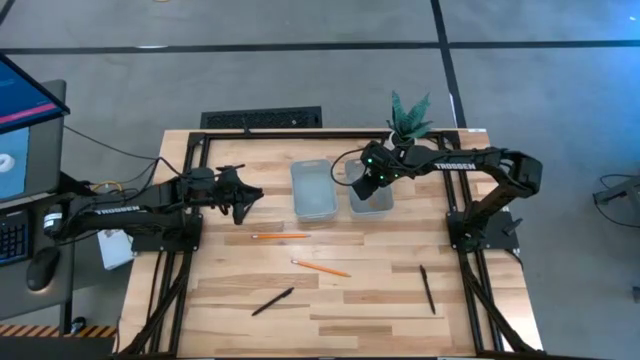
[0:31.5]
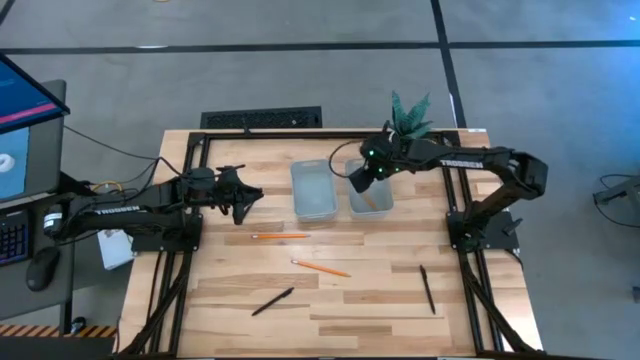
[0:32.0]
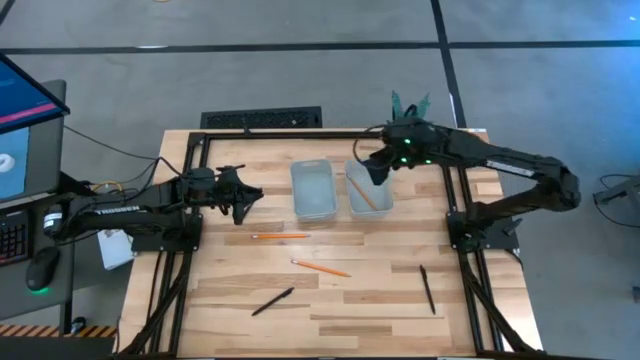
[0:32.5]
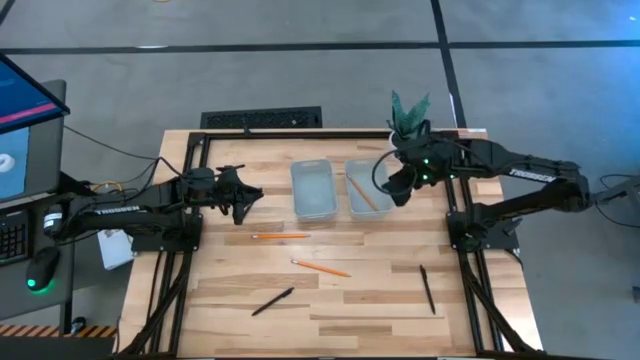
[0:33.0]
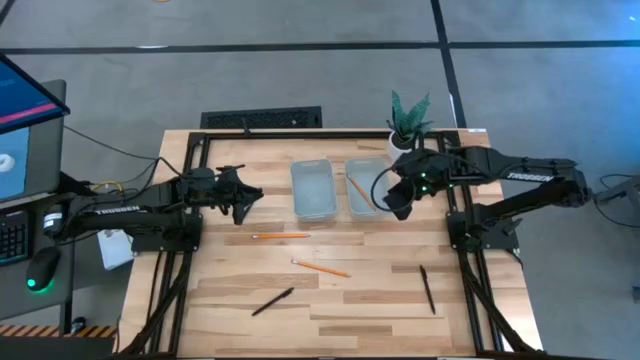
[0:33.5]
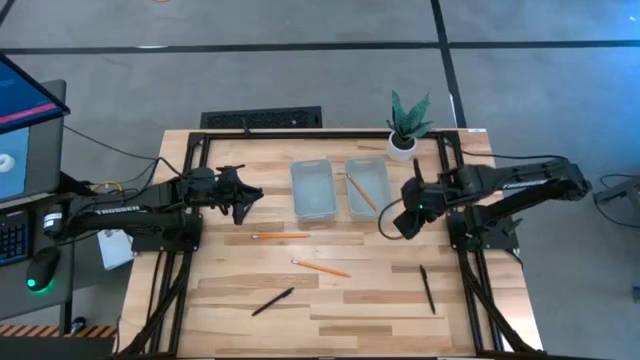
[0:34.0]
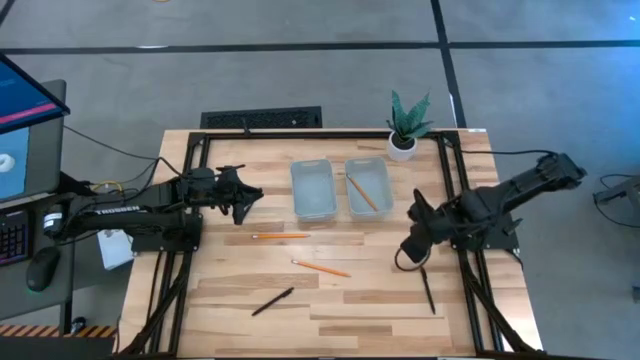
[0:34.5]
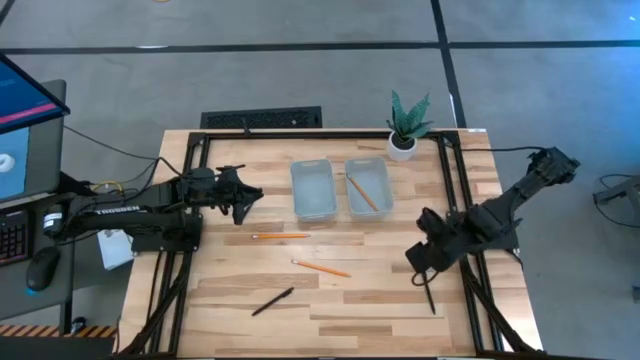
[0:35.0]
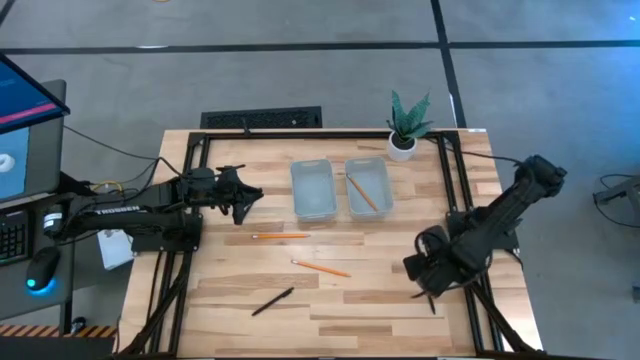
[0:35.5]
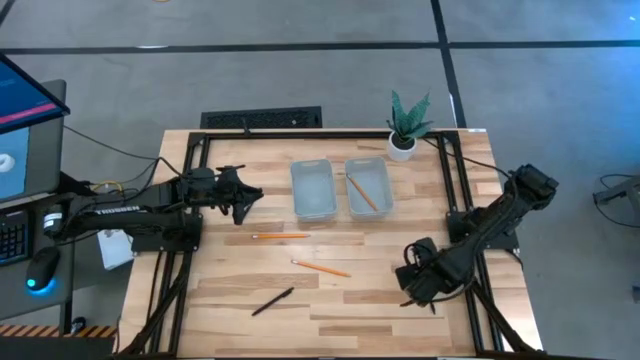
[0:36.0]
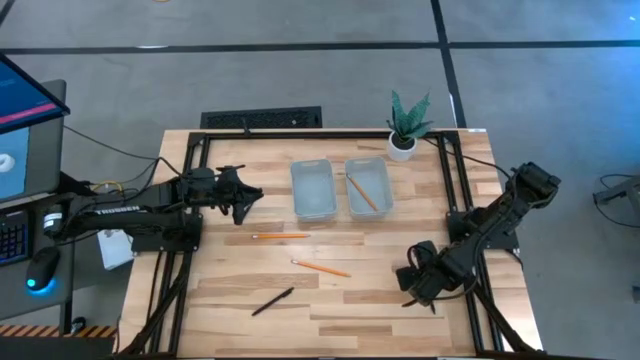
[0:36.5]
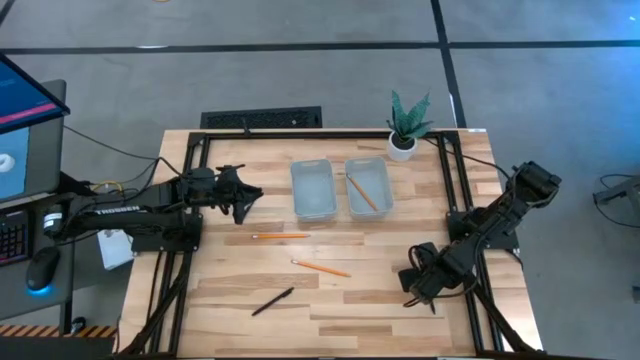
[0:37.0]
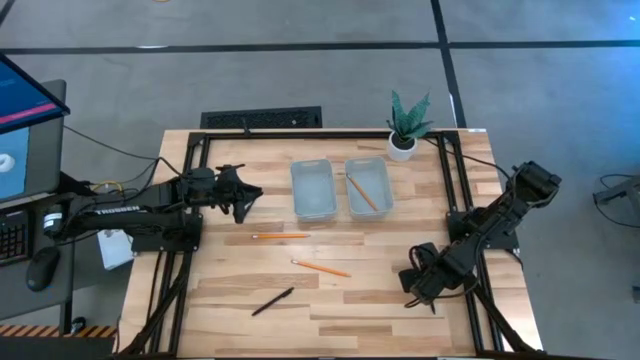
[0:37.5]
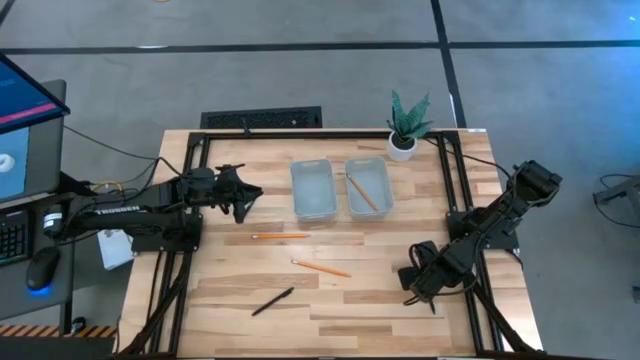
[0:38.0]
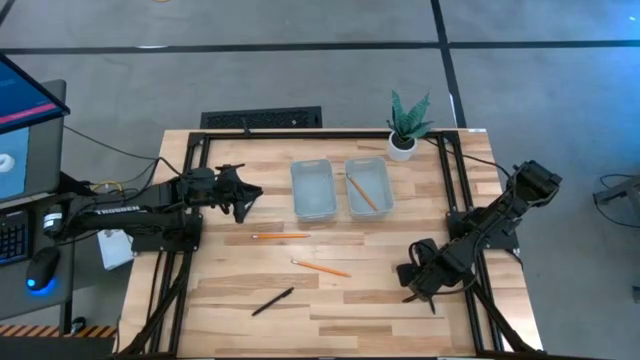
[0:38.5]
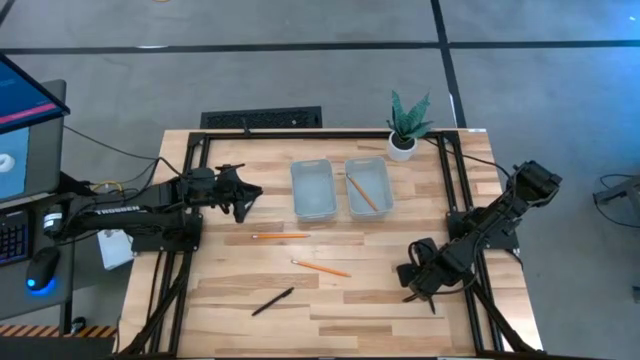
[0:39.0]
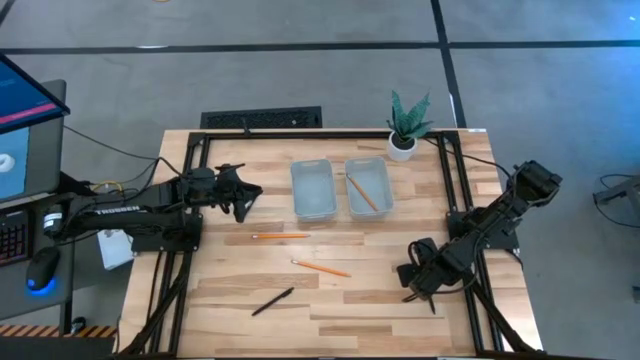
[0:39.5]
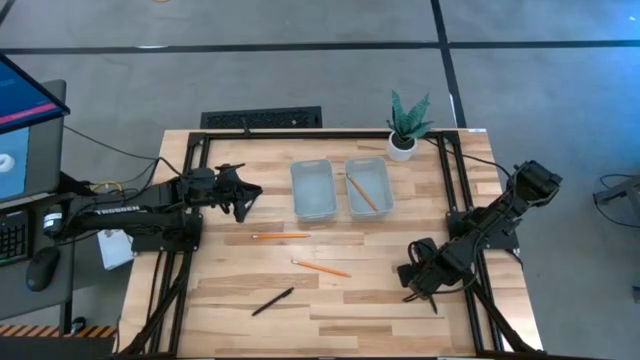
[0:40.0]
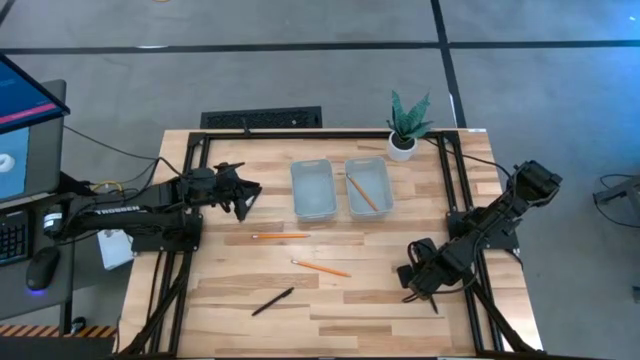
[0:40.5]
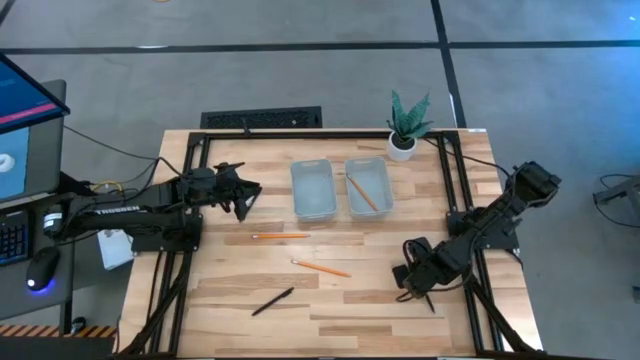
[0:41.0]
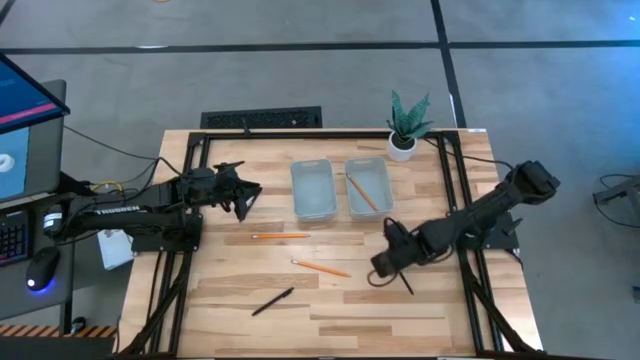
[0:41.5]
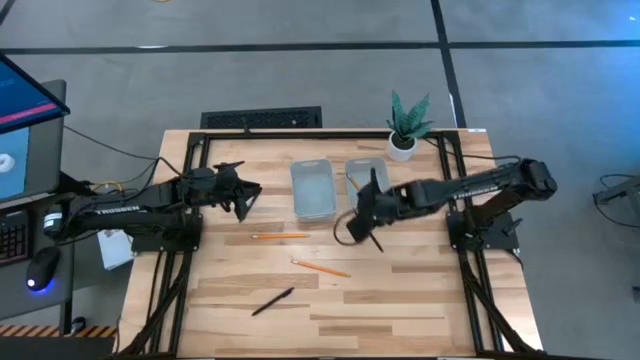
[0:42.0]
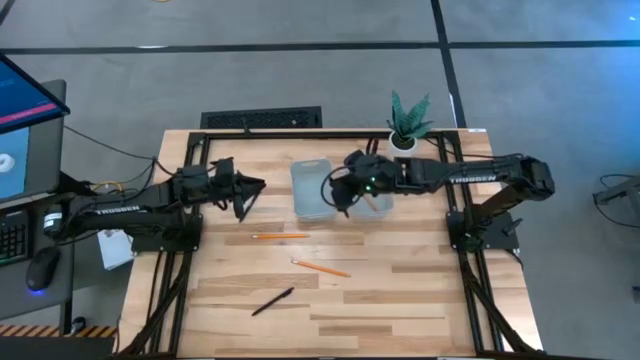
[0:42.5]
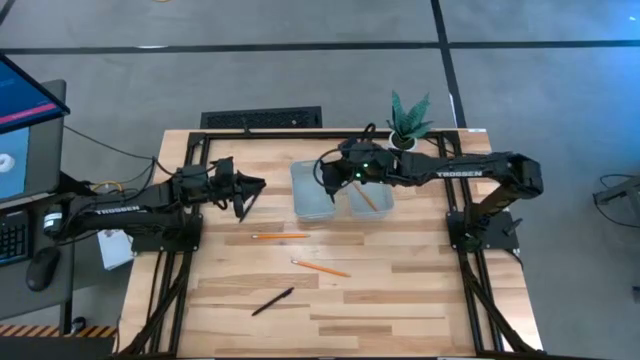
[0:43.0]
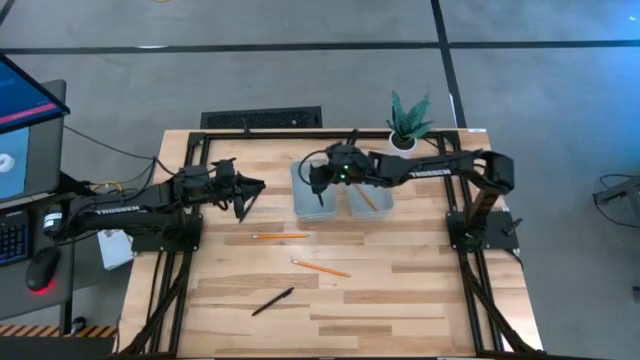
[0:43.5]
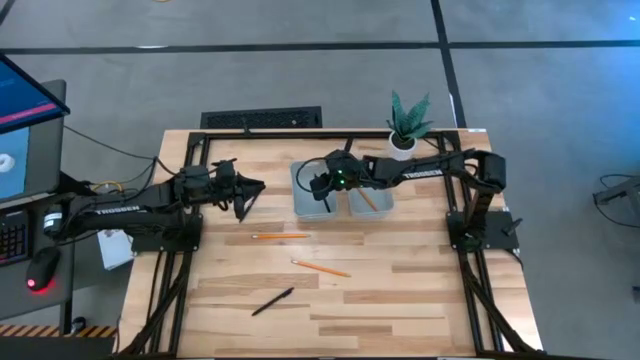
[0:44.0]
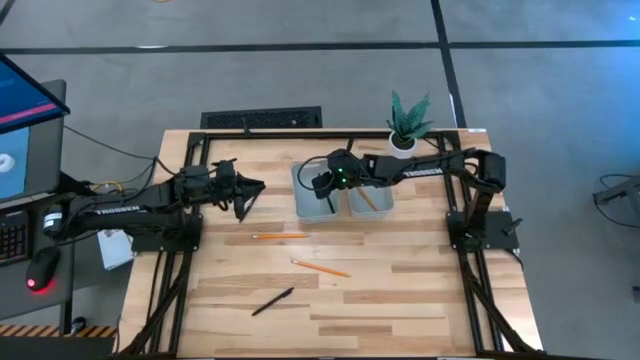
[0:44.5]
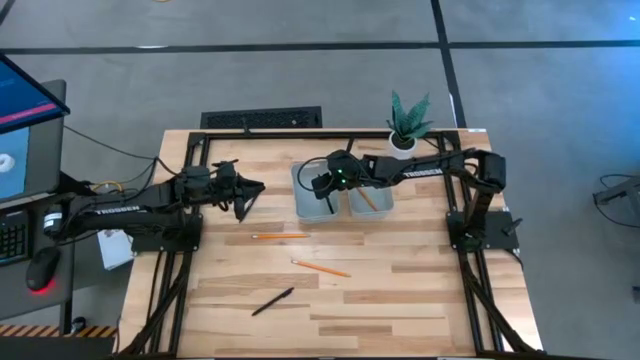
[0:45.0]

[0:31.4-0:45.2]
Task: Sort pens & pencils
Put the right black pen into the left gray bin

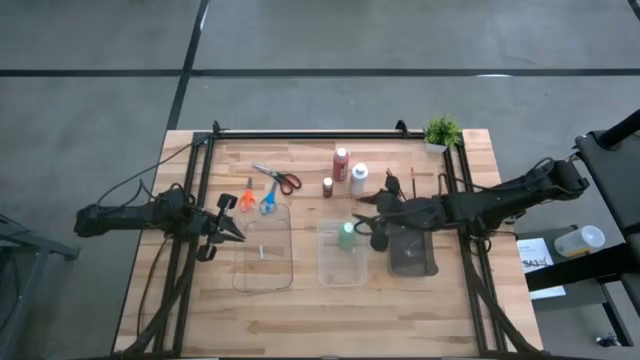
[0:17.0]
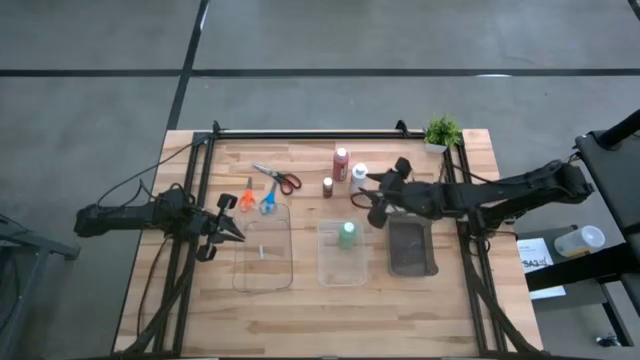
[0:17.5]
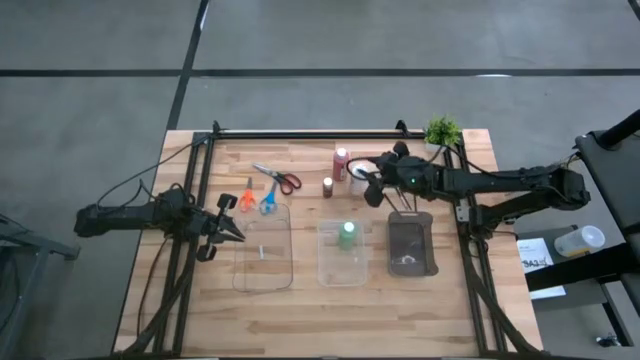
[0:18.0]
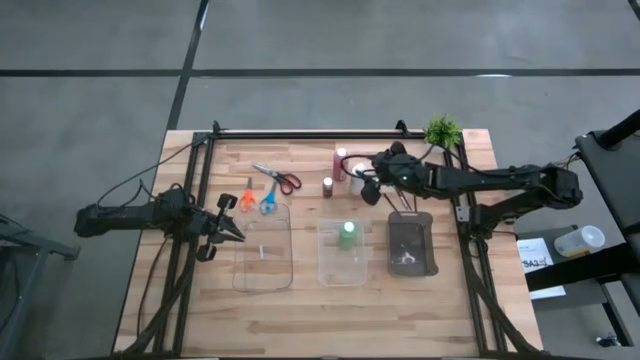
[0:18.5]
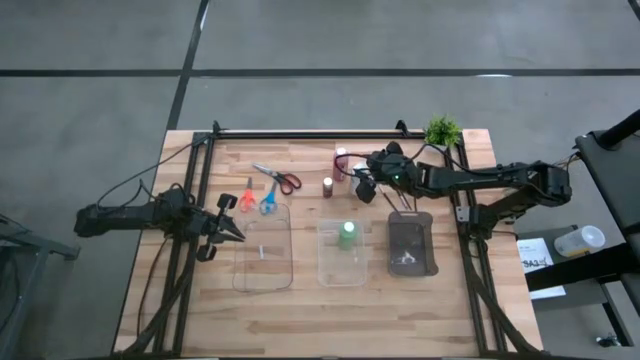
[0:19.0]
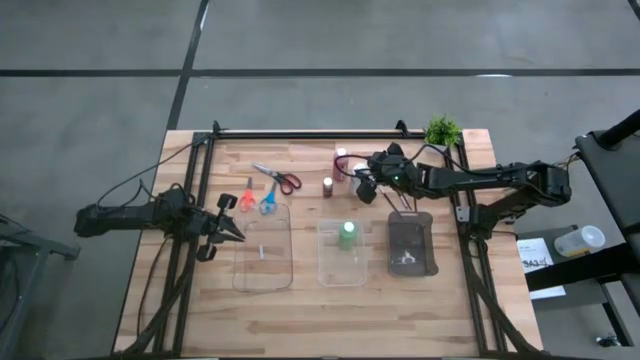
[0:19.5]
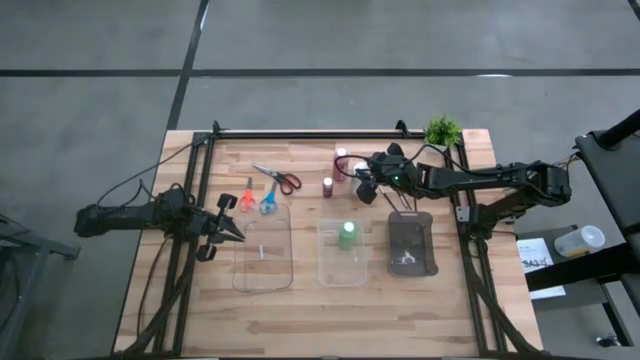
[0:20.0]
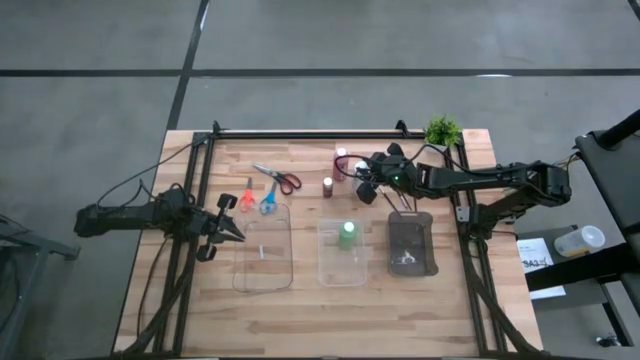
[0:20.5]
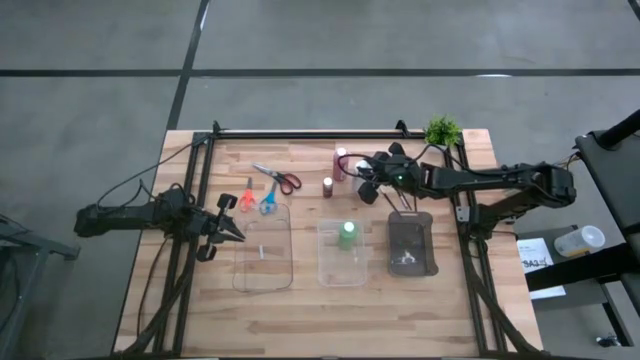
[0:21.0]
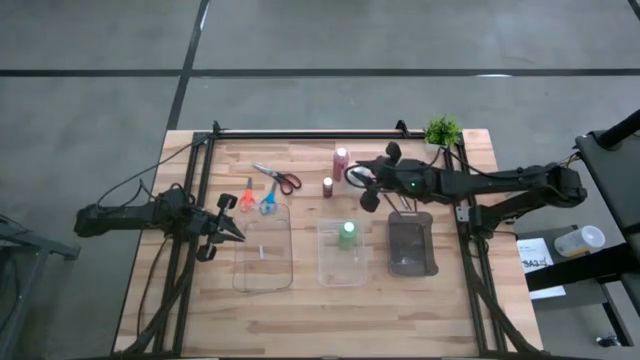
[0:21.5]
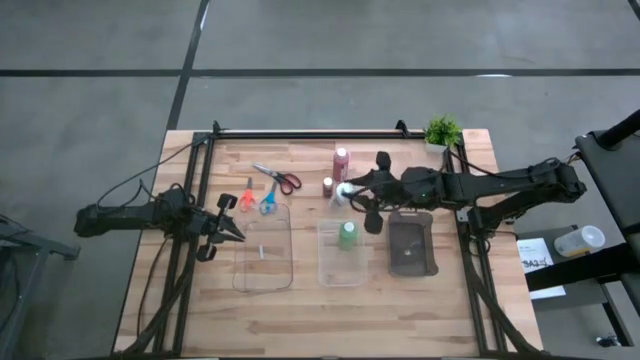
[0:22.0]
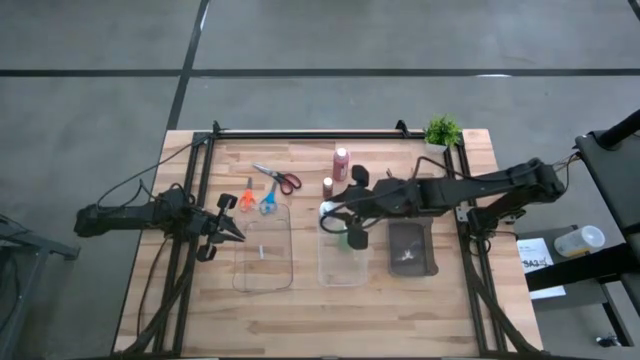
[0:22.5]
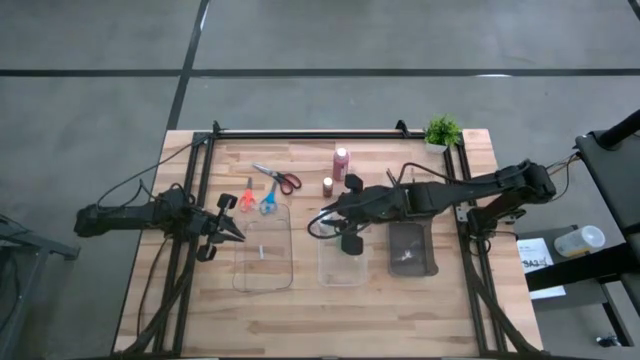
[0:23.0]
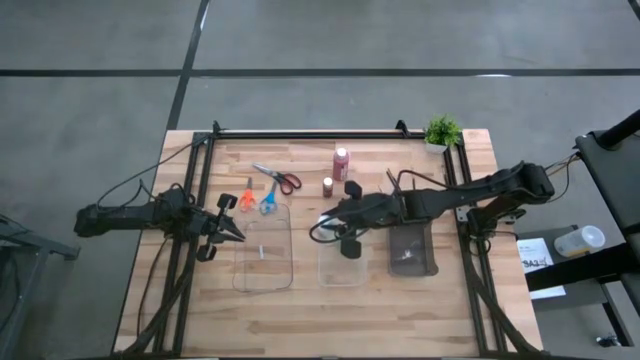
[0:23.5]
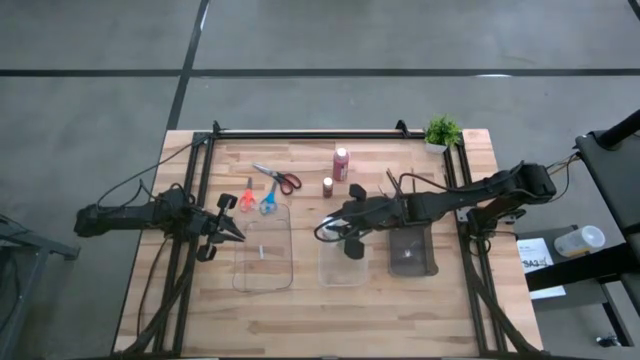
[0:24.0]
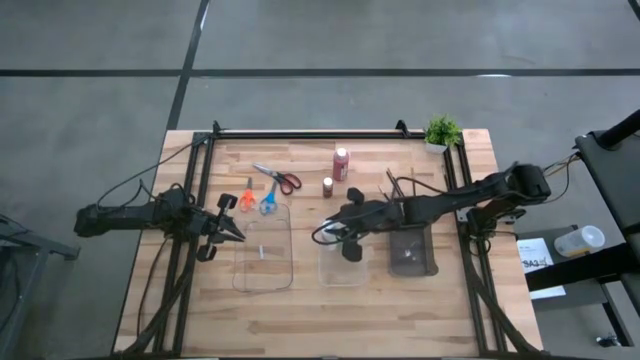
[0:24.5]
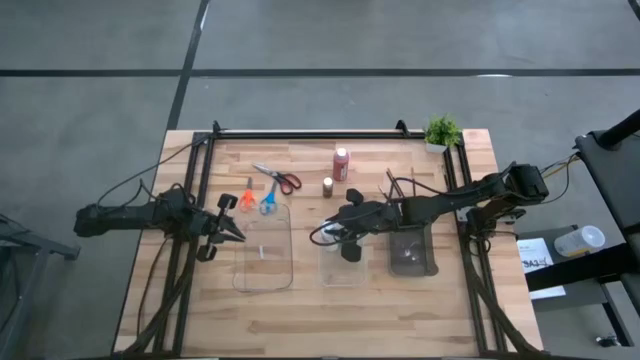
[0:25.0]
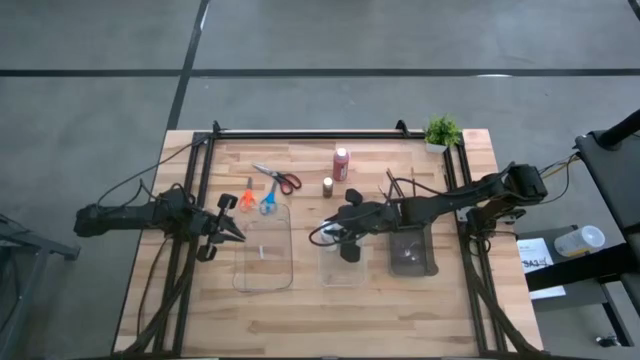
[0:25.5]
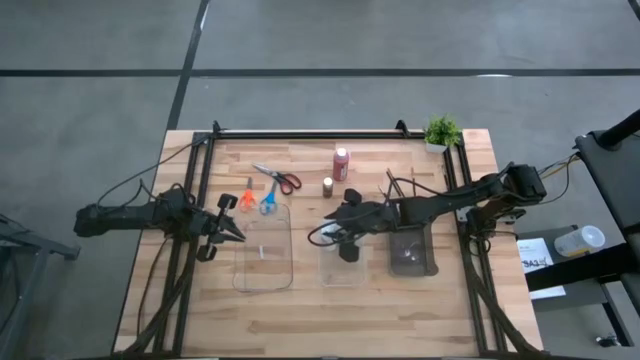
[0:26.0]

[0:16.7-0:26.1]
Task: Pick & Place Paint Supplies
Put the white bottle into the white transparent bin
